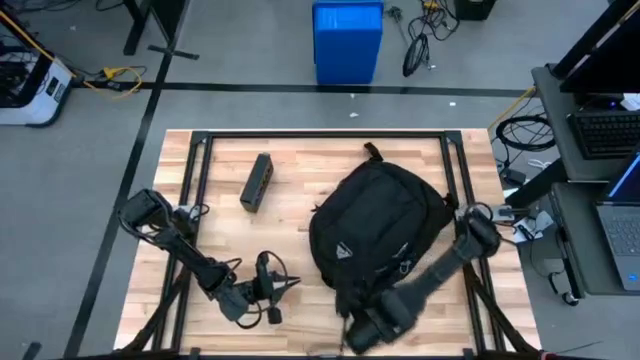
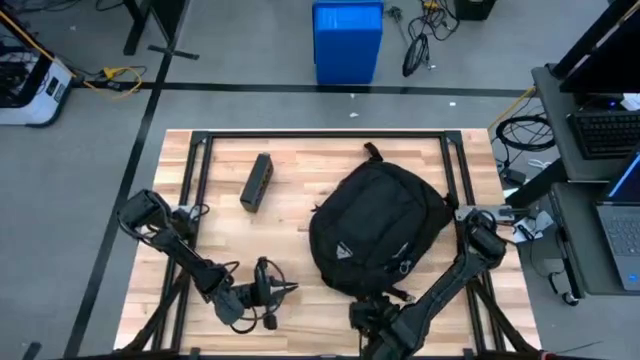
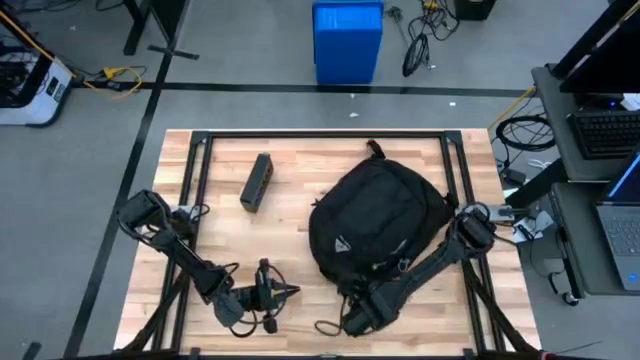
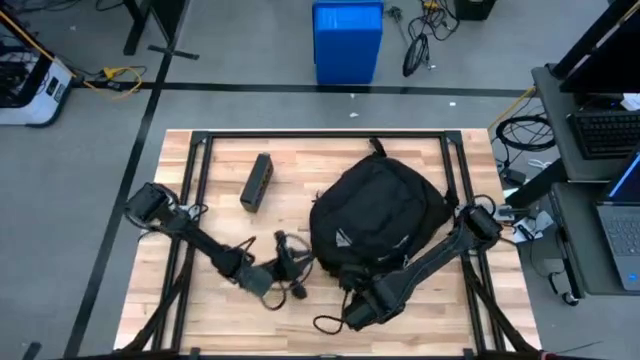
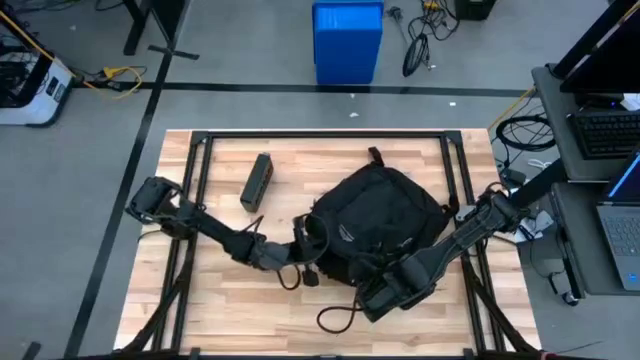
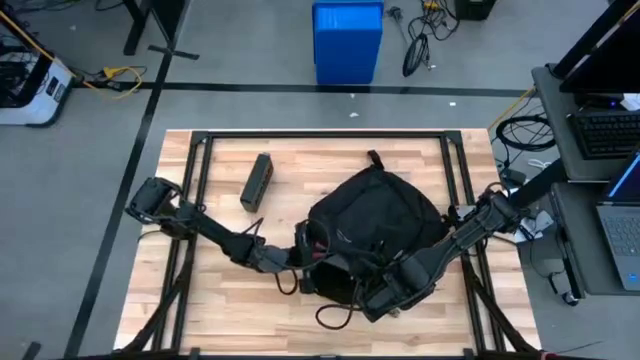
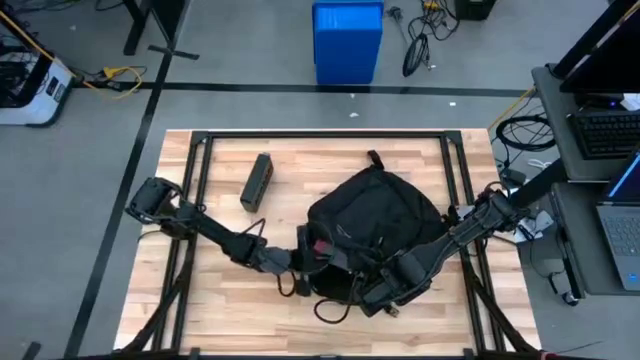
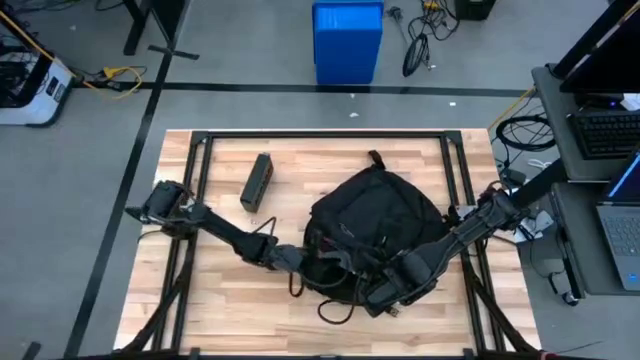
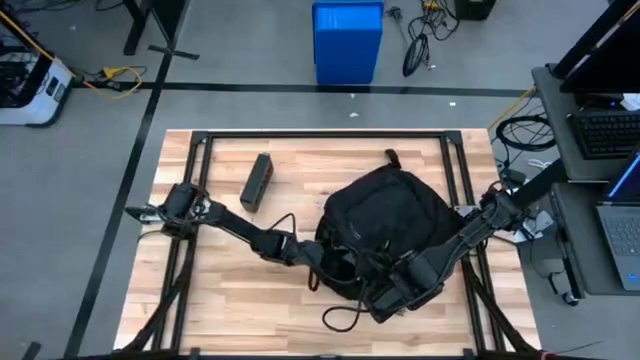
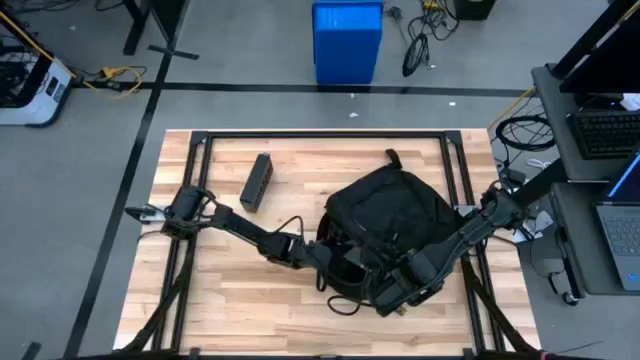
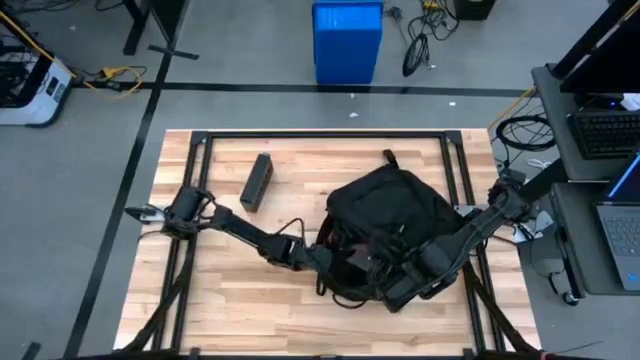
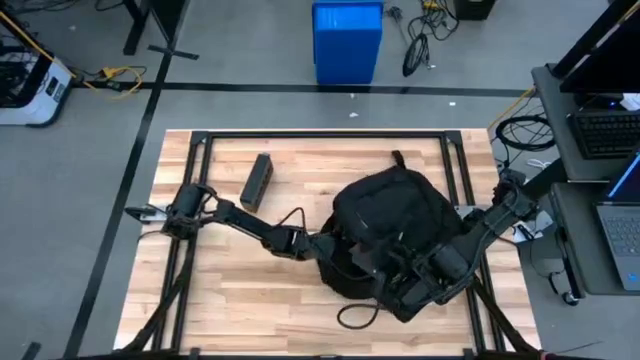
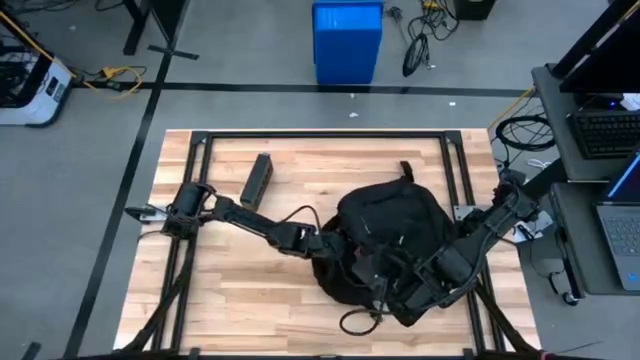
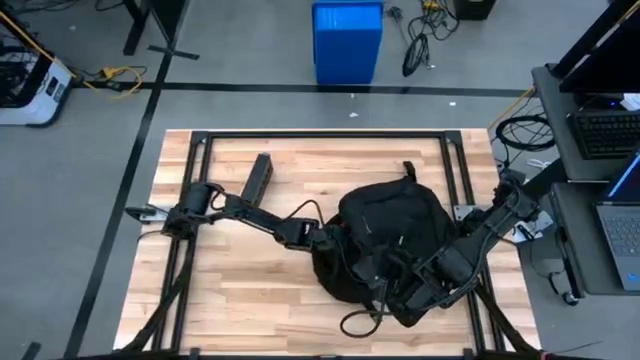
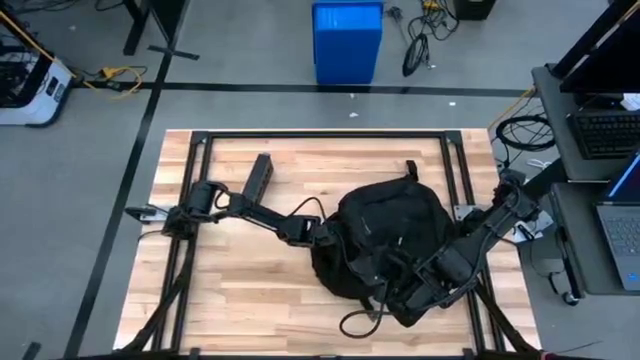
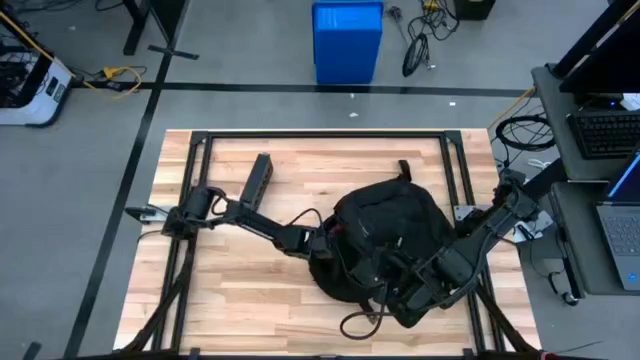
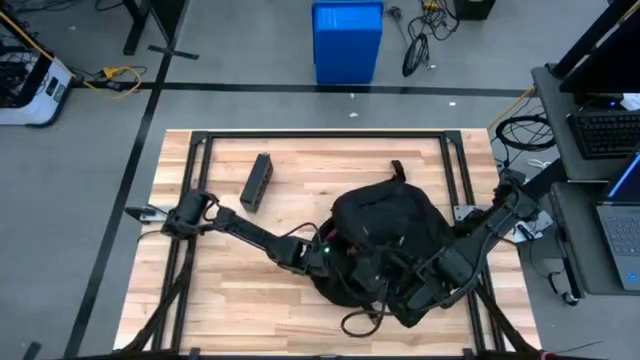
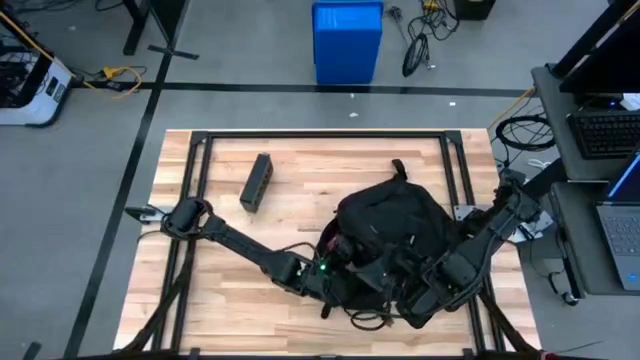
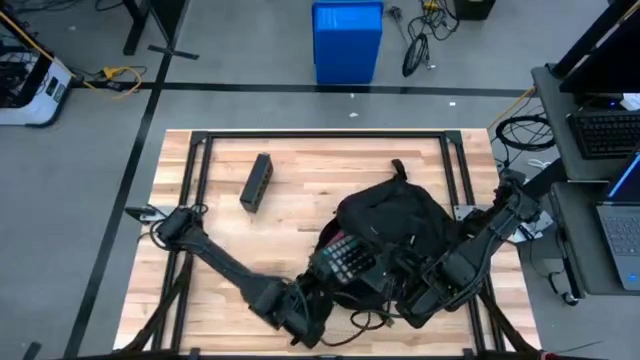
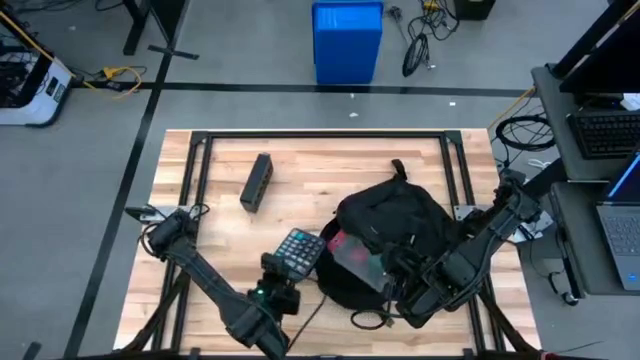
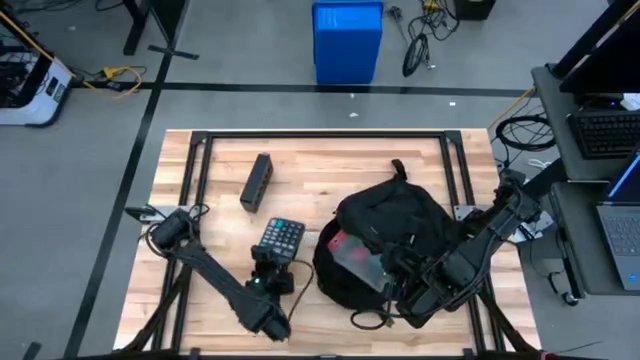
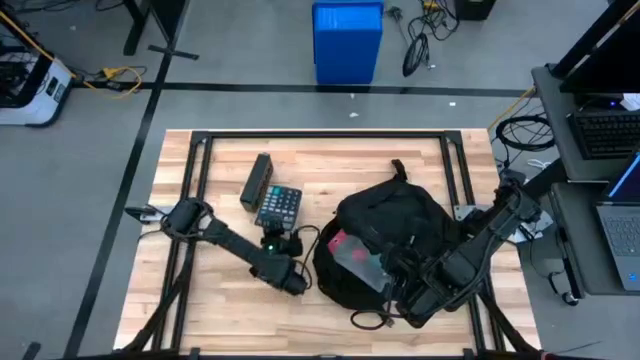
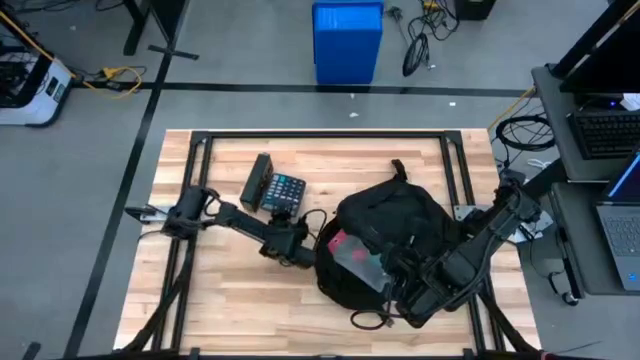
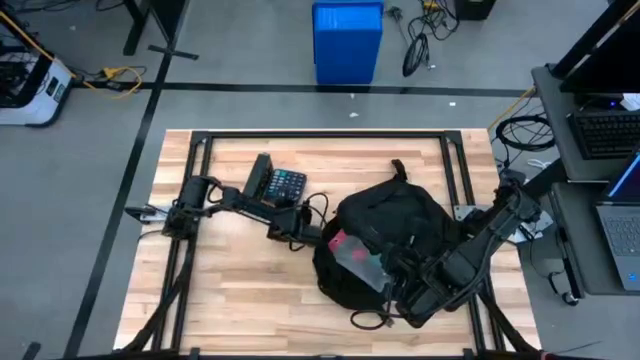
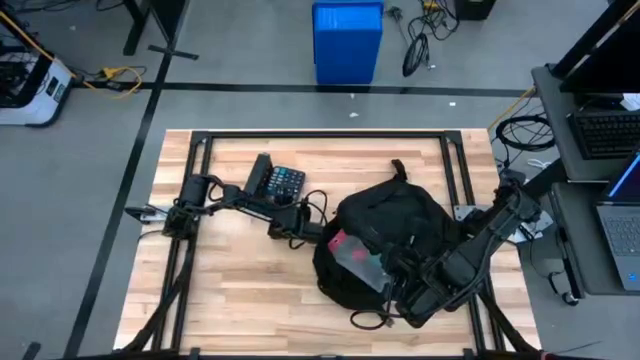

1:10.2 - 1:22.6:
Task: Unpack backpack
Remove the black calculator from the black backpack

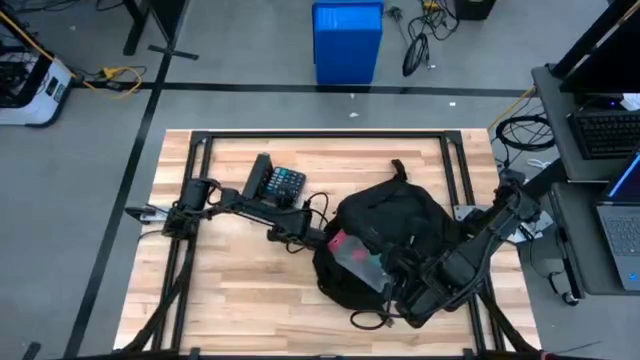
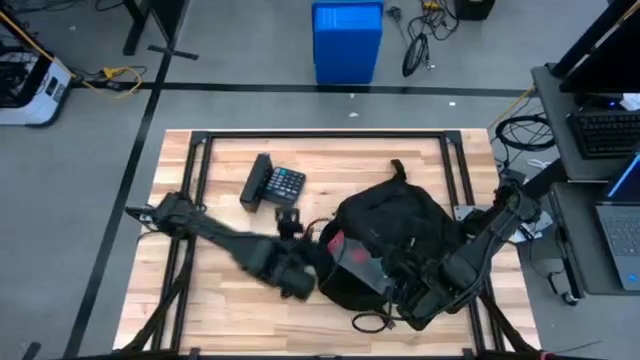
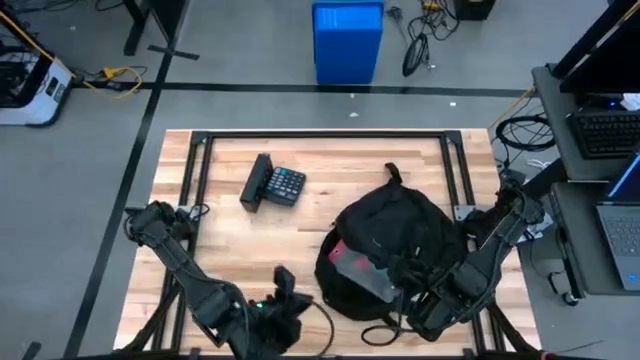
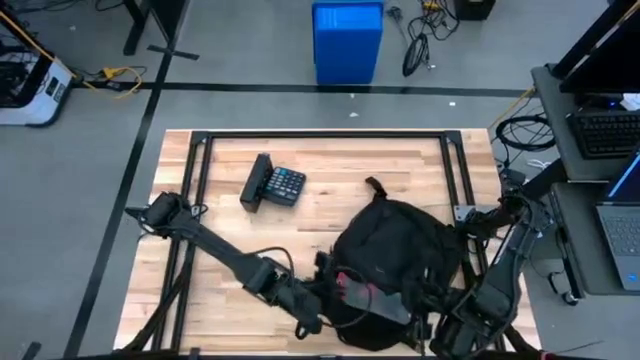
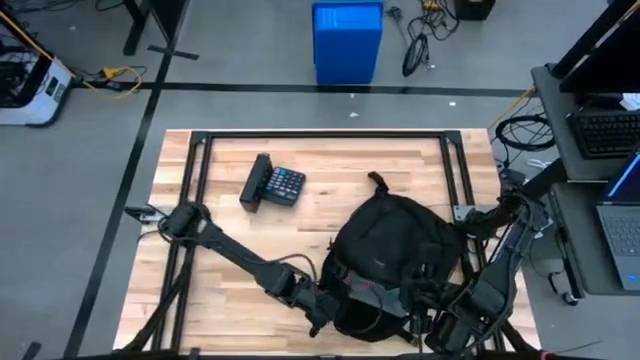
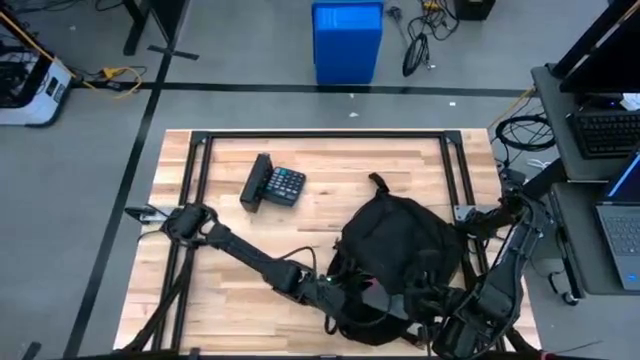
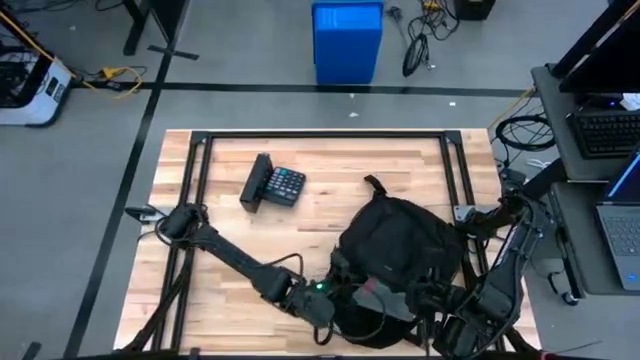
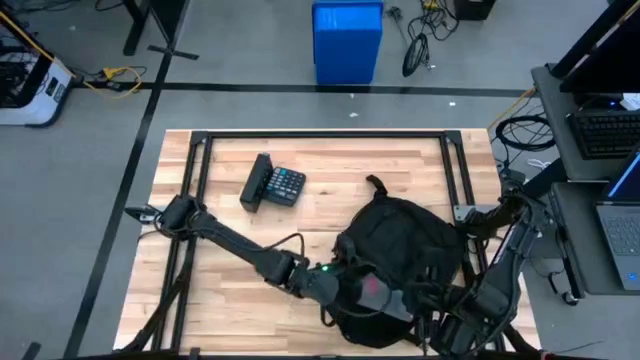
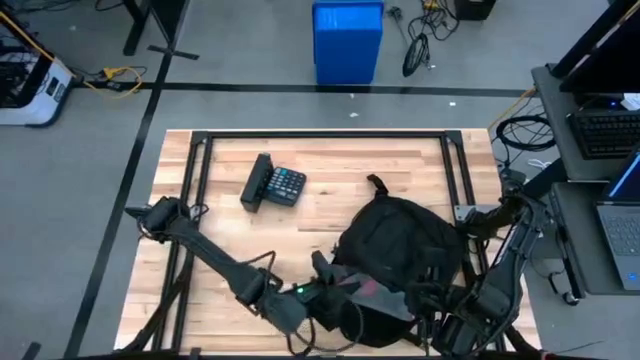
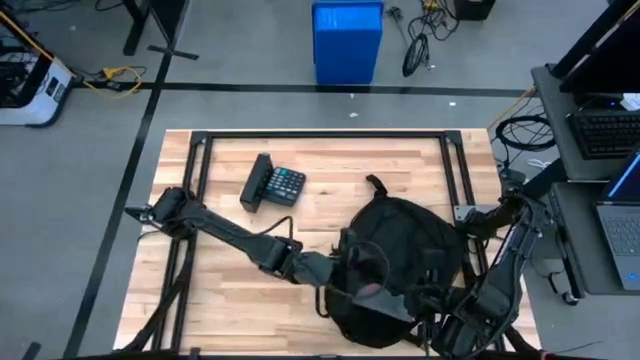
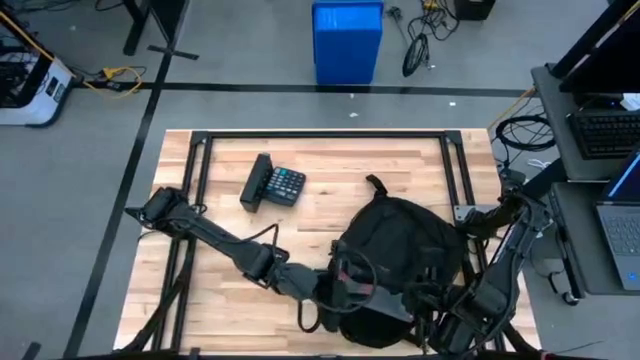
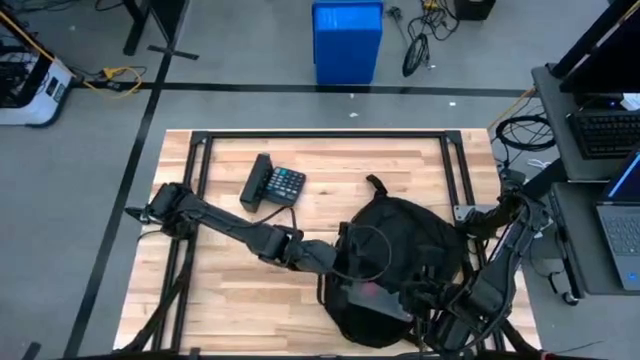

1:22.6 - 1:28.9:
Remove the white zip bag from the black backpack

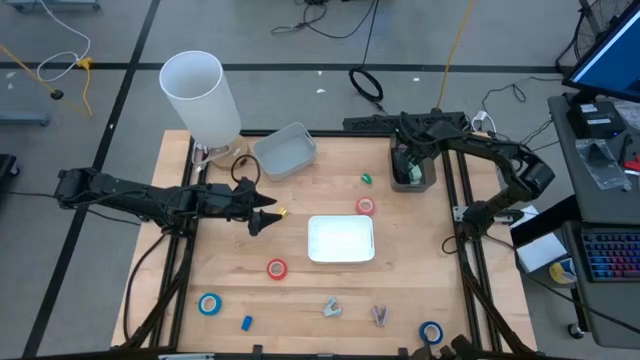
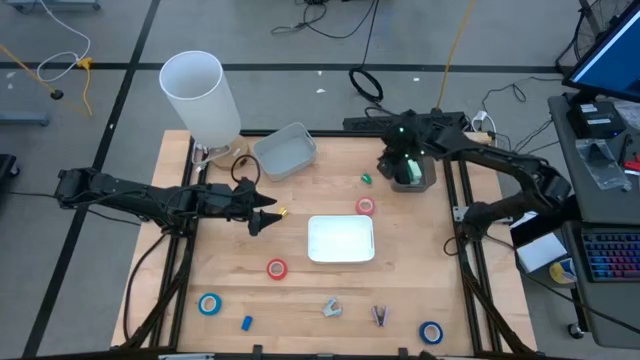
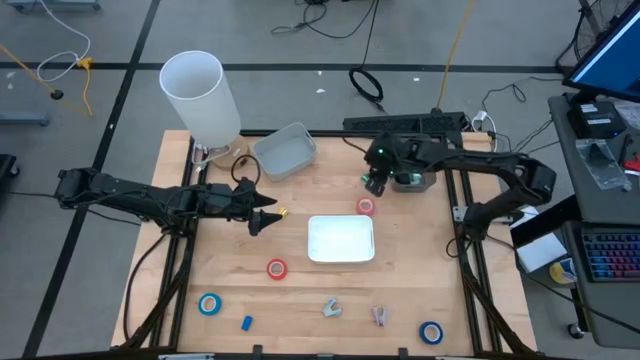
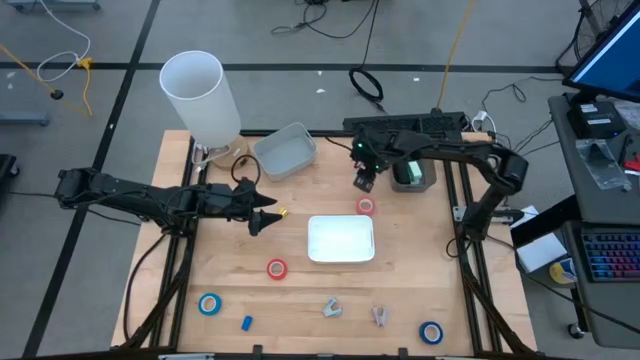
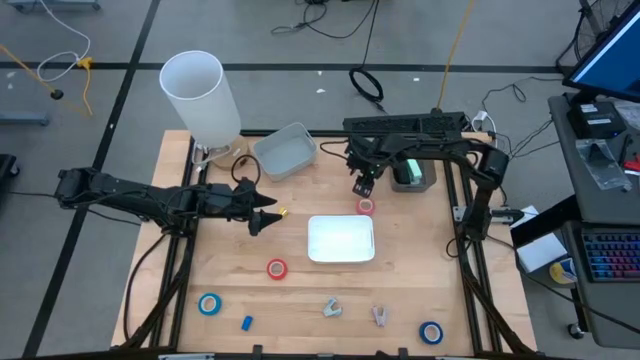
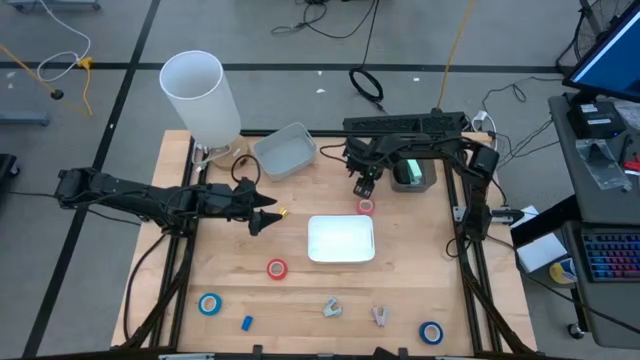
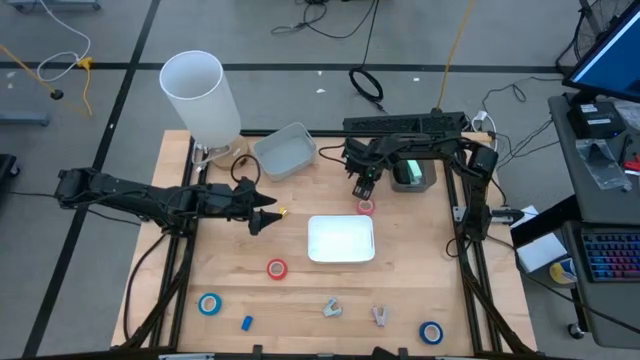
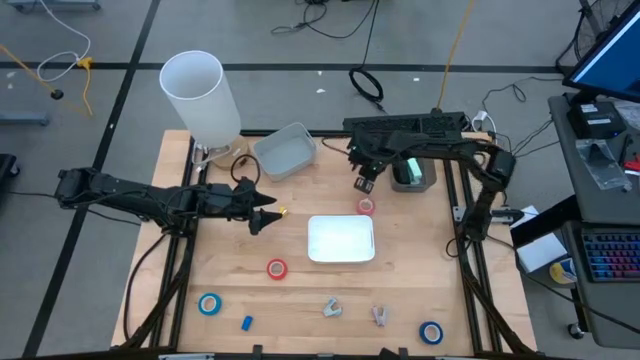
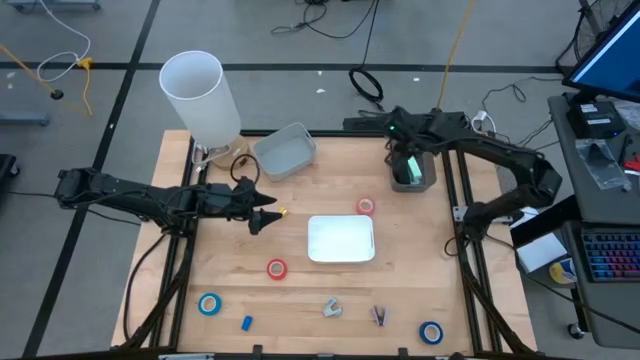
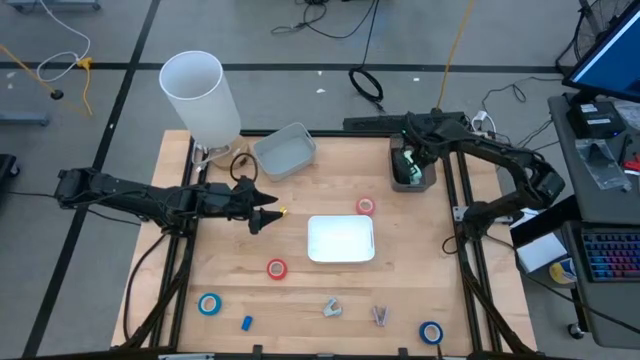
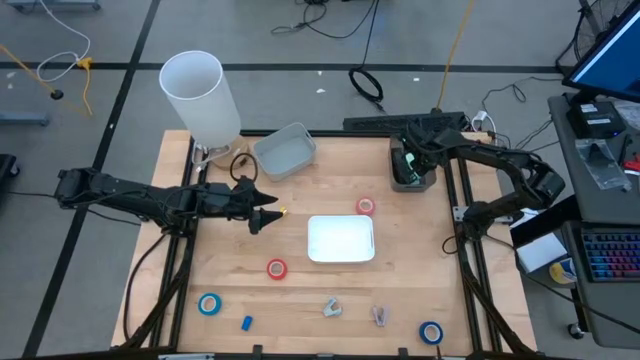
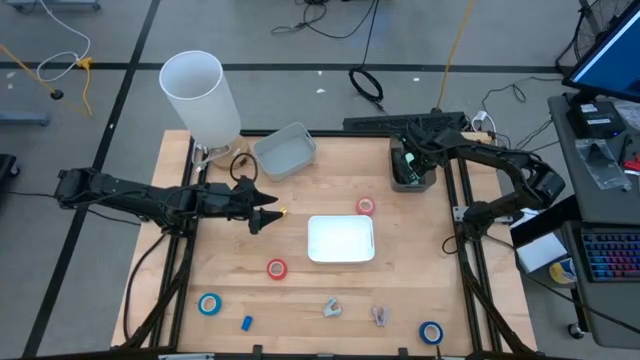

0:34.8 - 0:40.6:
Task: Pick and place Stapler, Stapler remover, tape
Put the green stapler into the black bin
